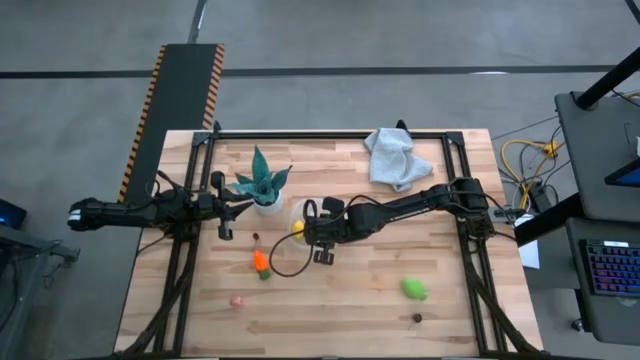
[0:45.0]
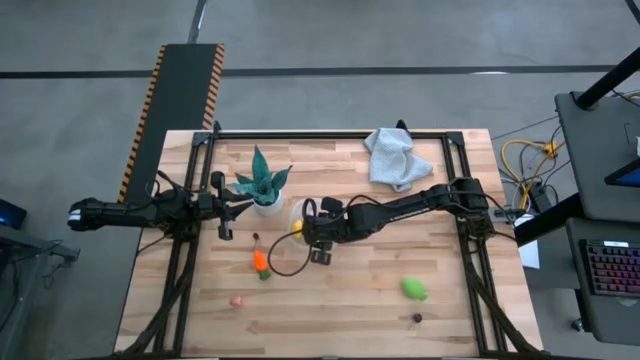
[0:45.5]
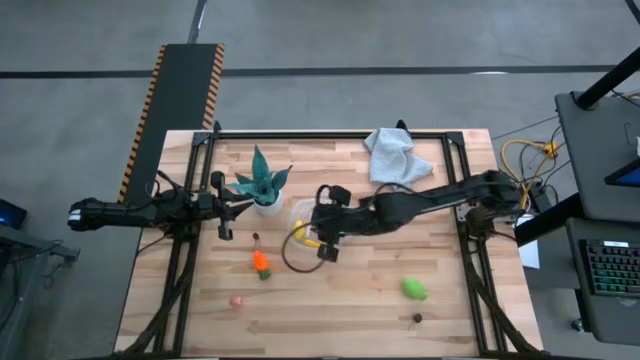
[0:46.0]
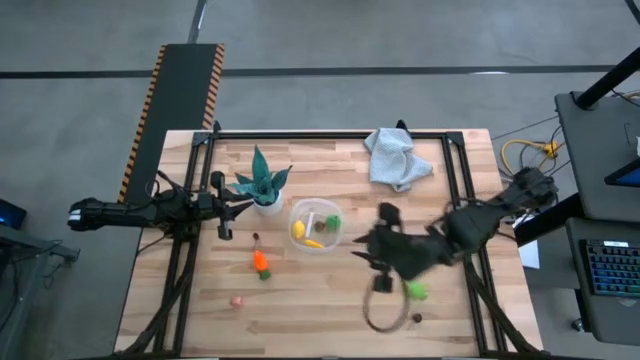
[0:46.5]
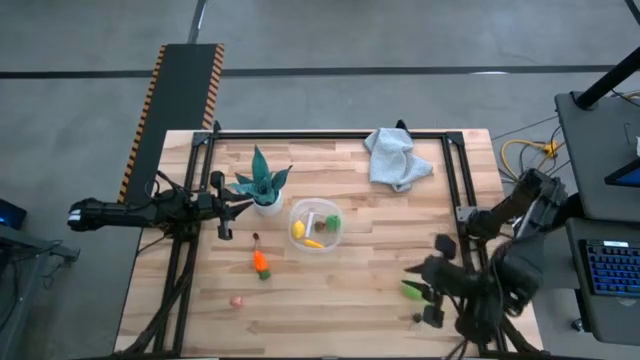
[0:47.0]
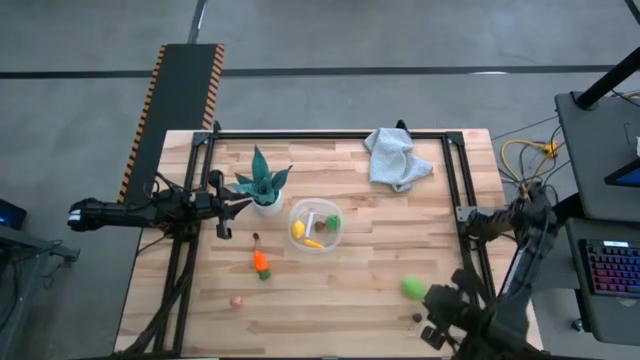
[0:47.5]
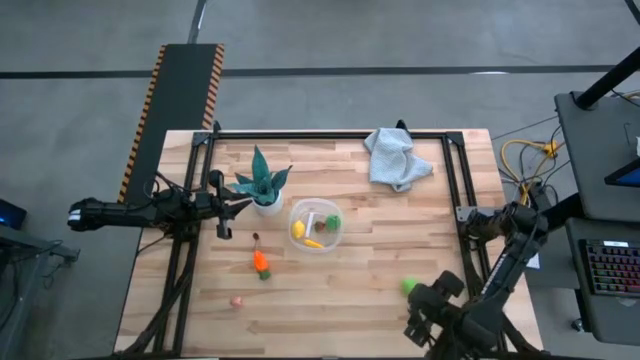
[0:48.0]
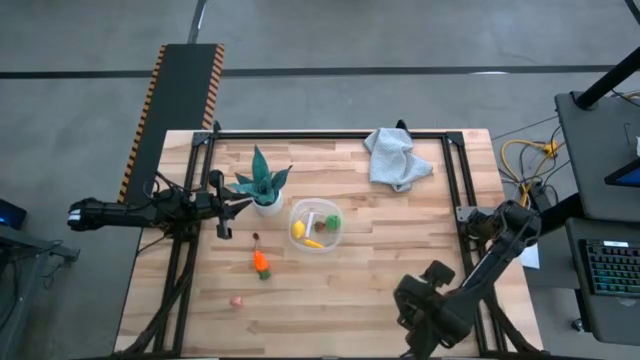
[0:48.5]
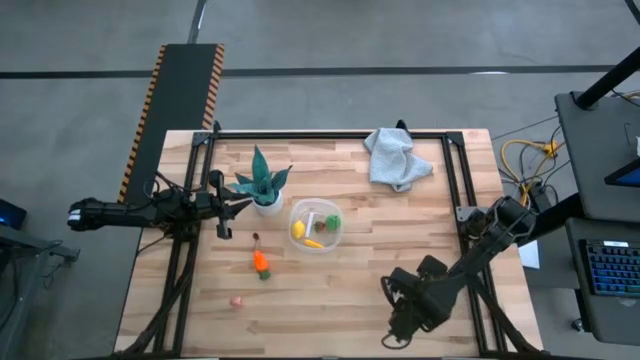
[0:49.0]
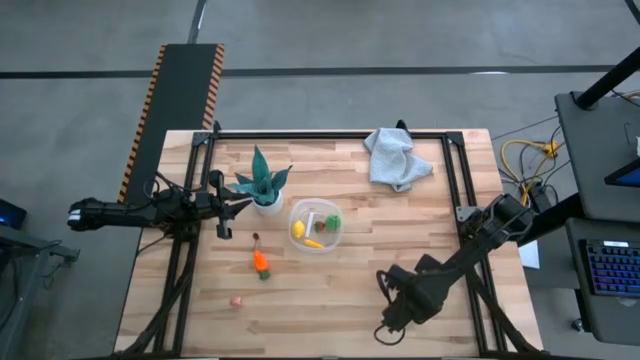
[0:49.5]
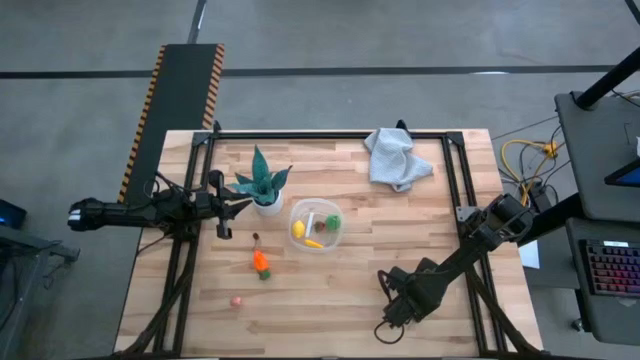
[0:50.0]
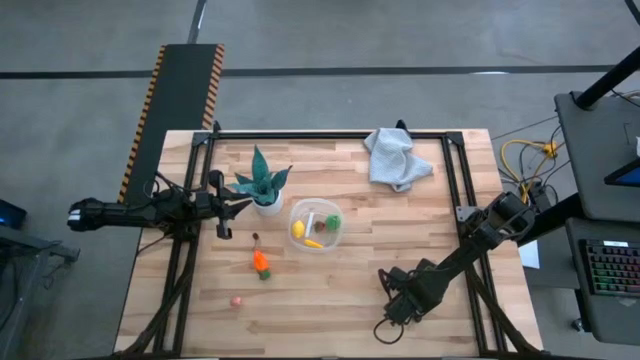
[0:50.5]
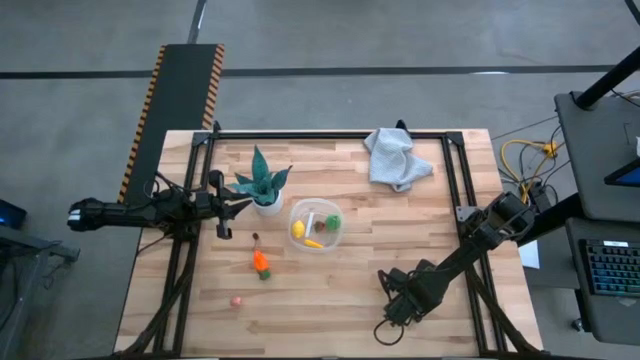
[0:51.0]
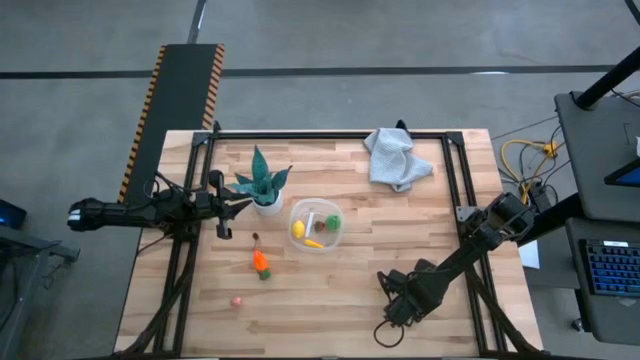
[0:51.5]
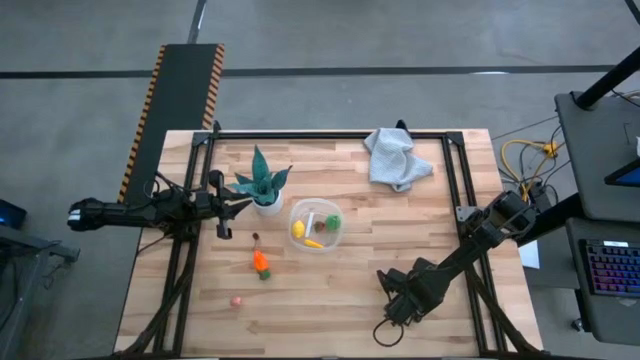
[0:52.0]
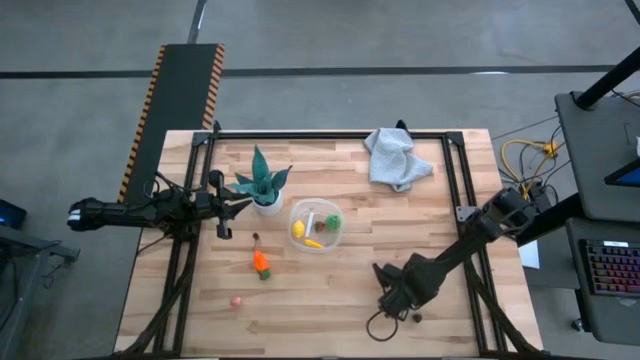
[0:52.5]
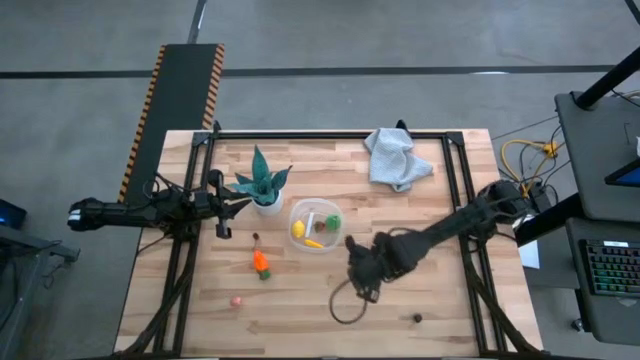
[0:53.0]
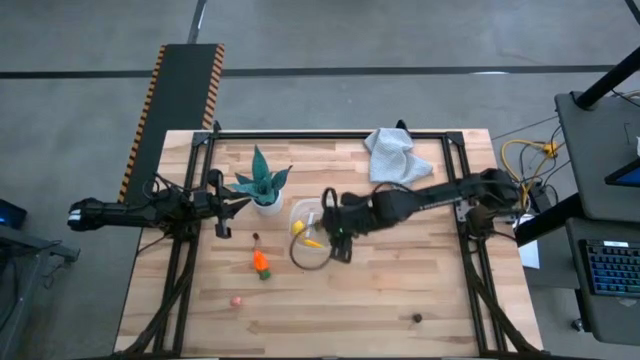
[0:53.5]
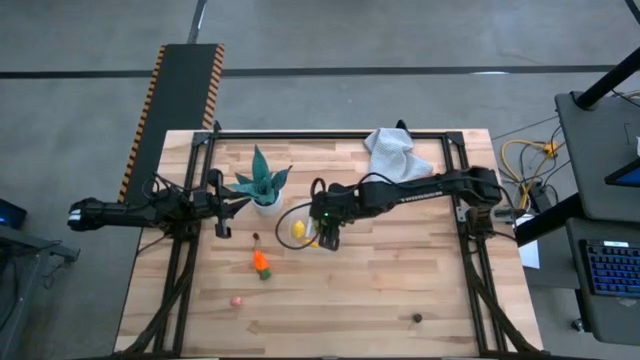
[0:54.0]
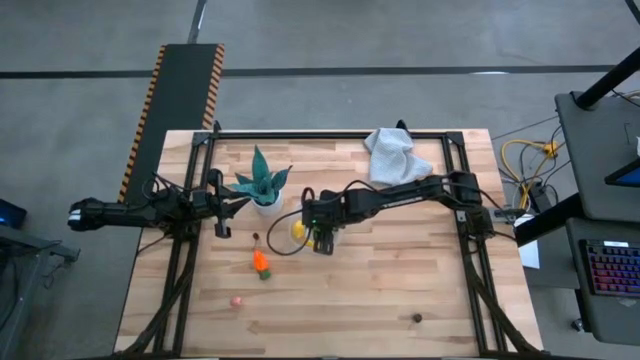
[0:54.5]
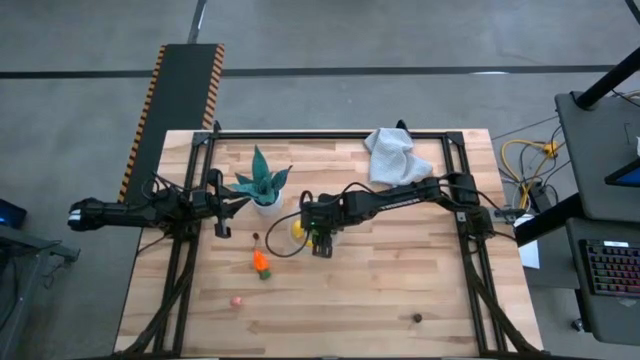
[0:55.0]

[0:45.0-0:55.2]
Task: Pick and placing Produce into tupperware
Put the green cabbage into the container

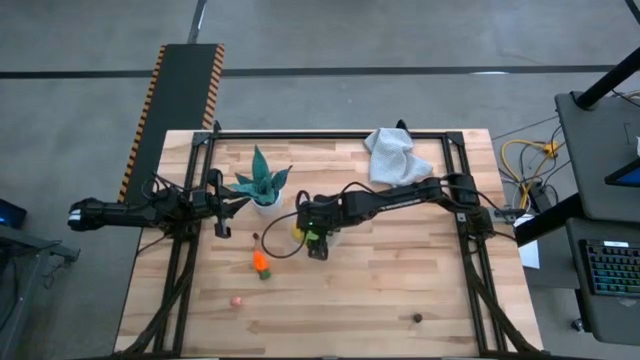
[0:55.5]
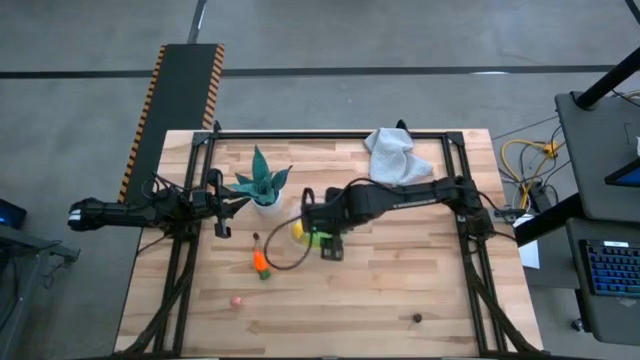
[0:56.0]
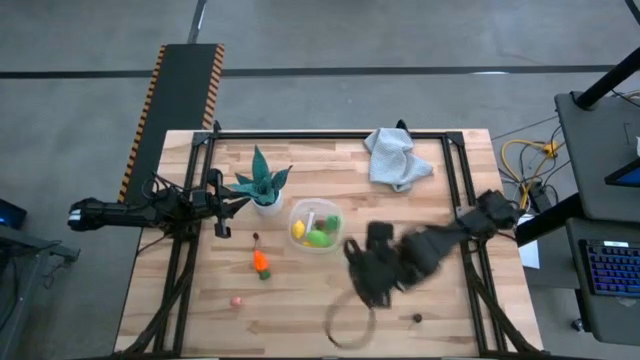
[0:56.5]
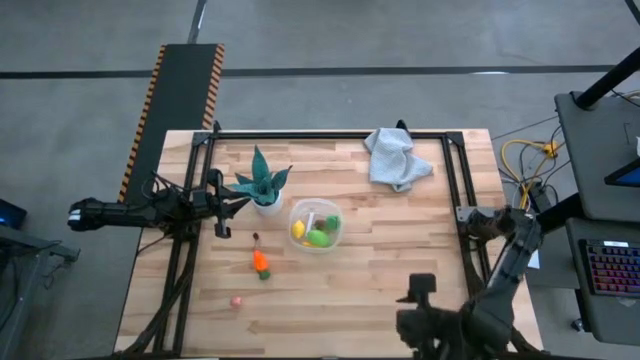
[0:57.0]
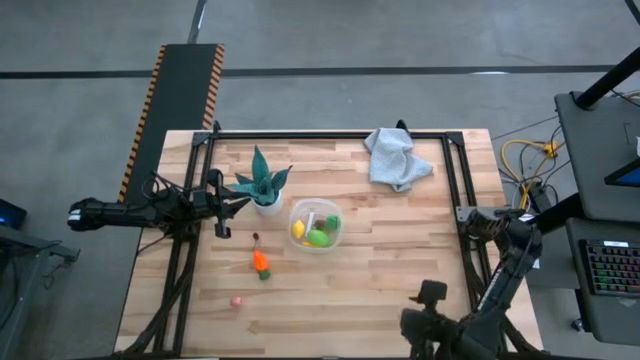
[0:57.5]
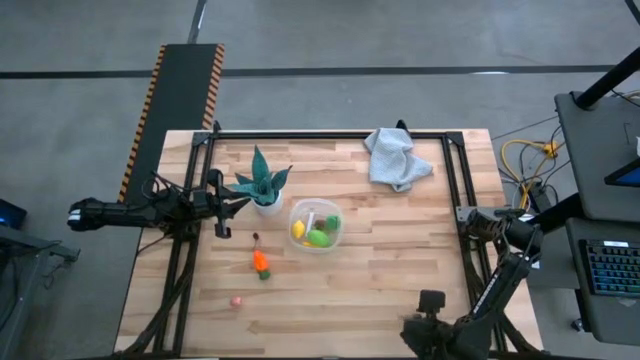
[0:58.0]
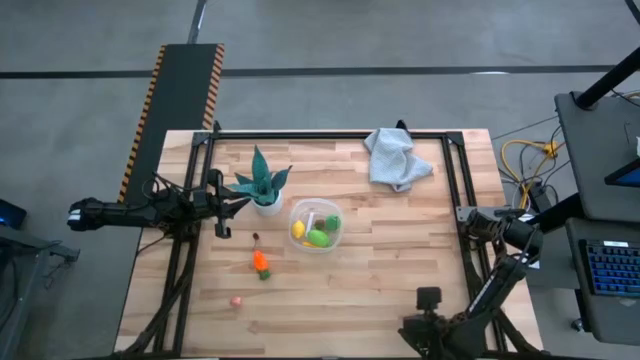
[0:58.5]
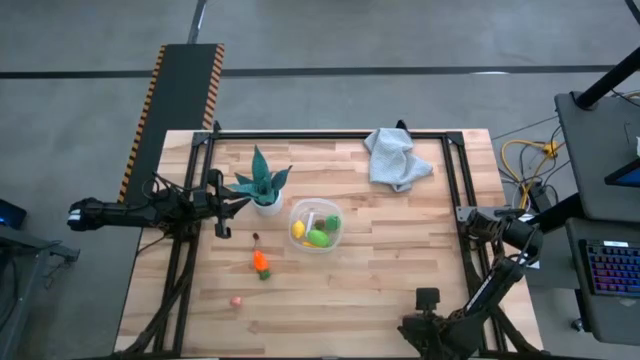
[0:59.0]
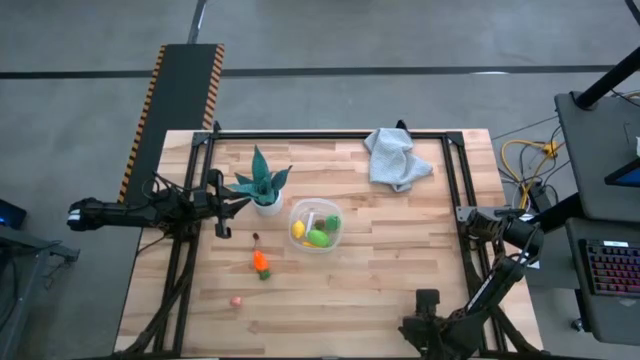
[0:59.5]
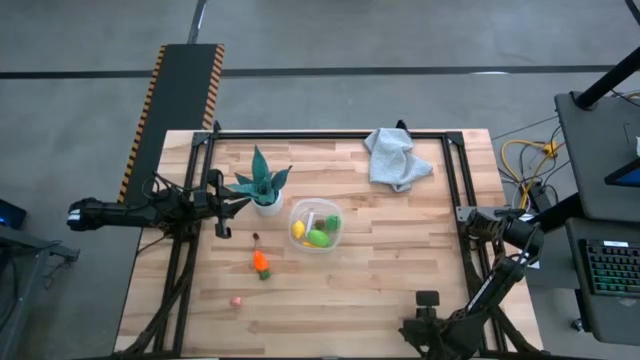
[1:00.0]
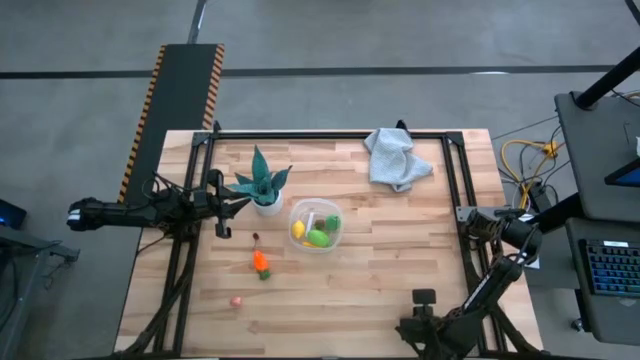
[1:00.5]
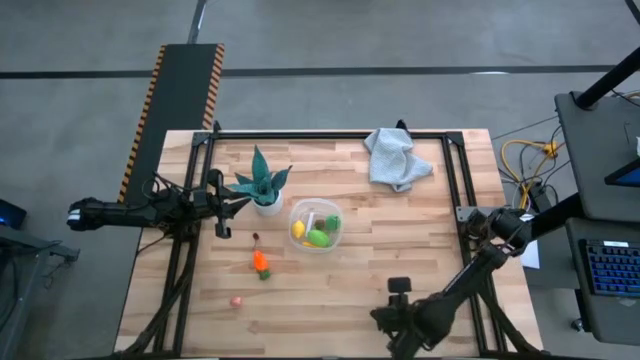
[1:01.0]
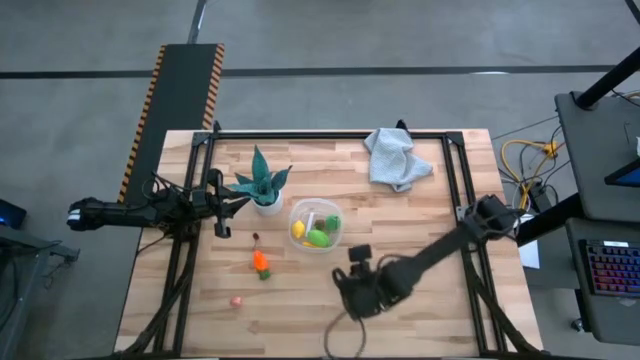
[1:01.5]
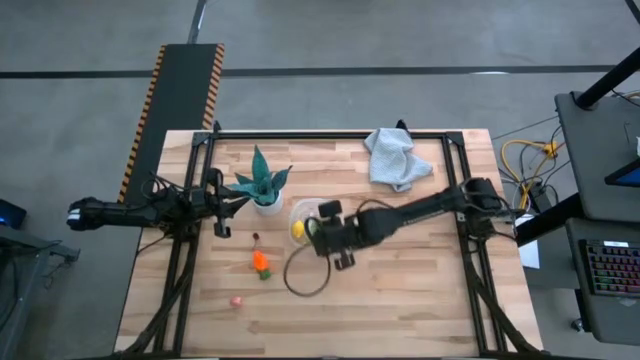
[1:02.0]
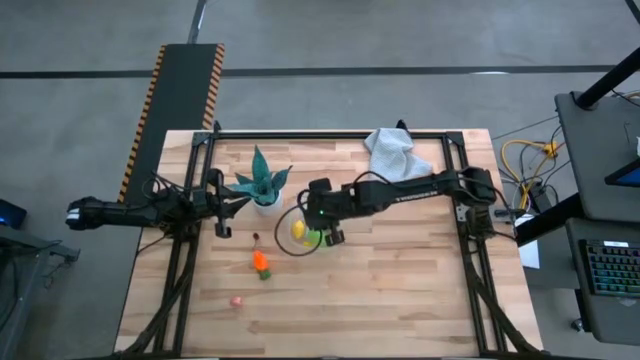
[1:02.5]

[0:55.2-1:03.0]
Put the black cherry into the container

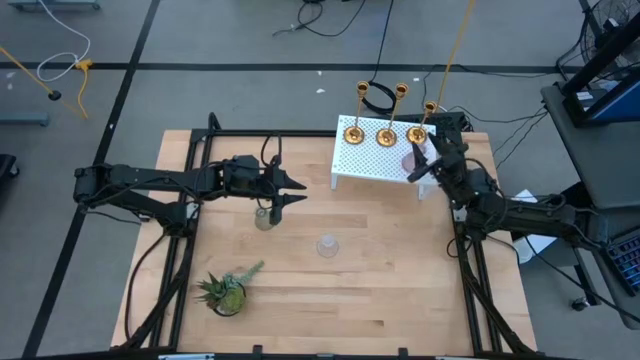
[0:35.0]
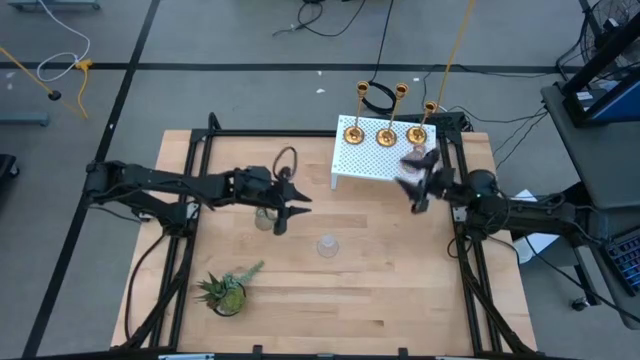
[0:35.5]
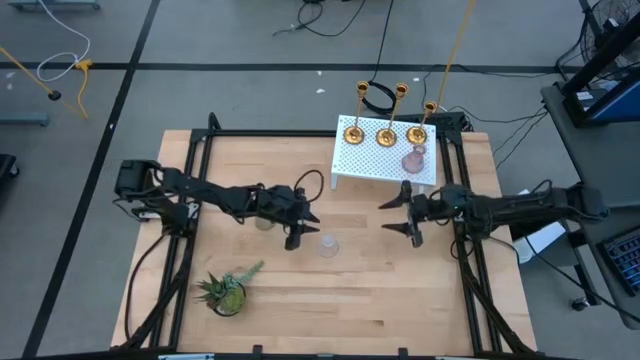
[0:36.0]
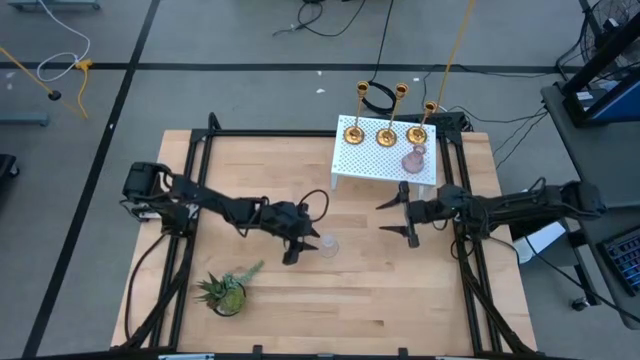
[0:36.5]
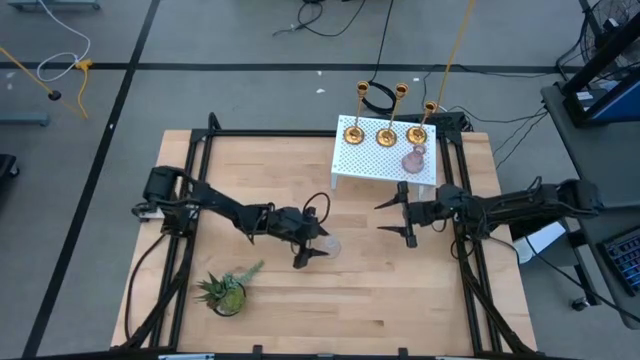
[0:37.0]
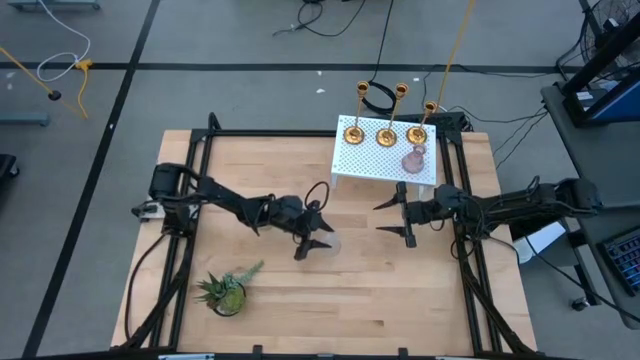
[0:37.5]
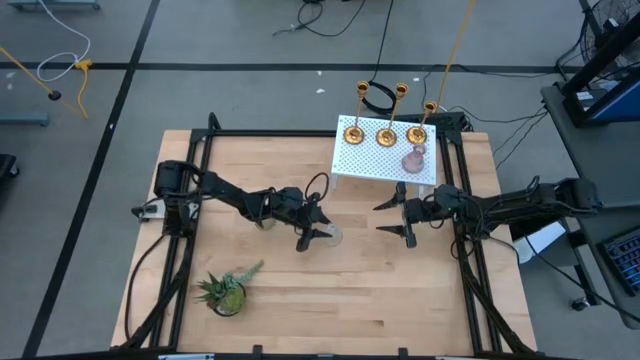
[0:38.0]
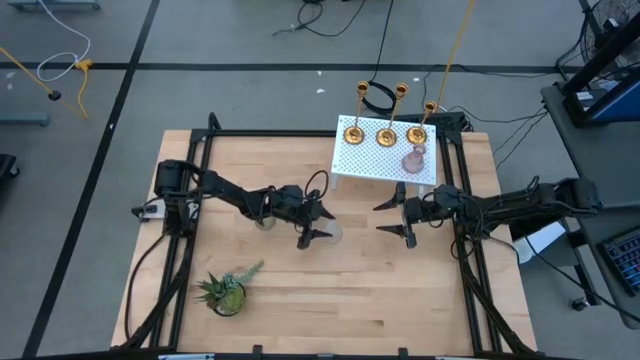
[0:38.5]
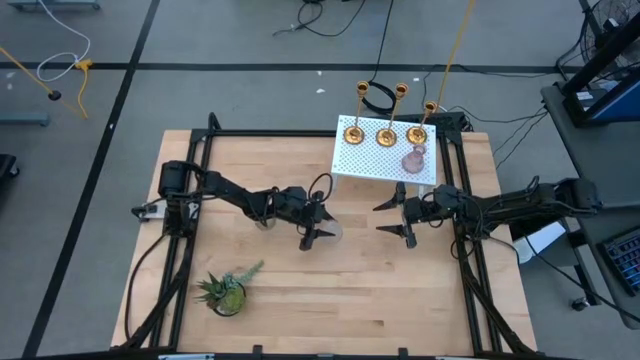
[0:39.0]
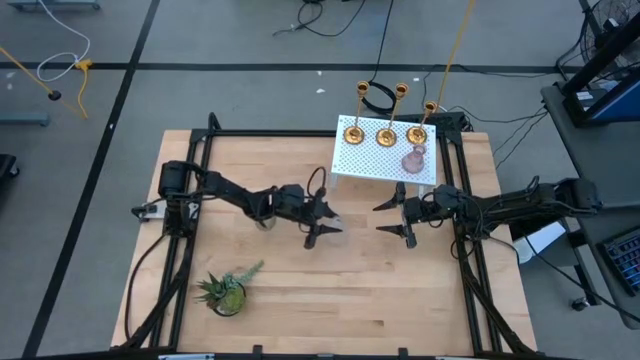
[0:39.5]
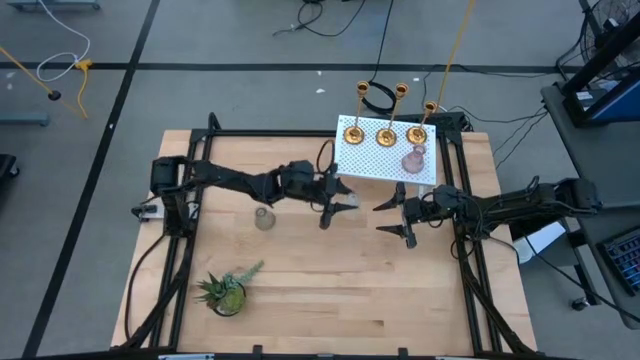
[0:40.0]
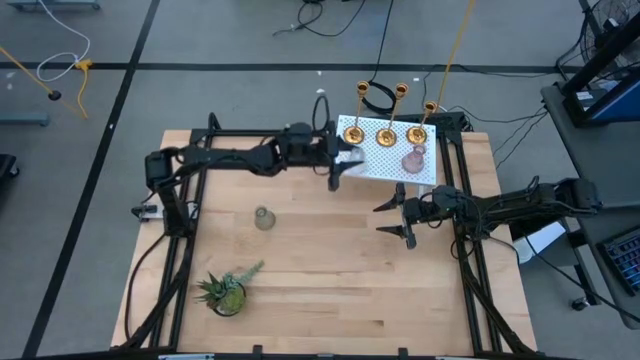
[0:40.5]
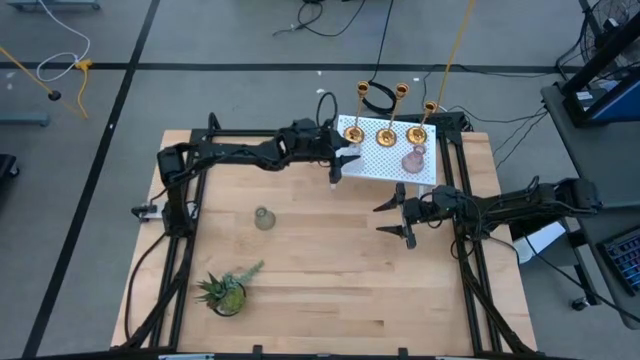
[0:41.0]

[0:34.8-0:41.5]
Task: Pick & Place candle stick holders
Put the transparent glass candle holder on the shelf
